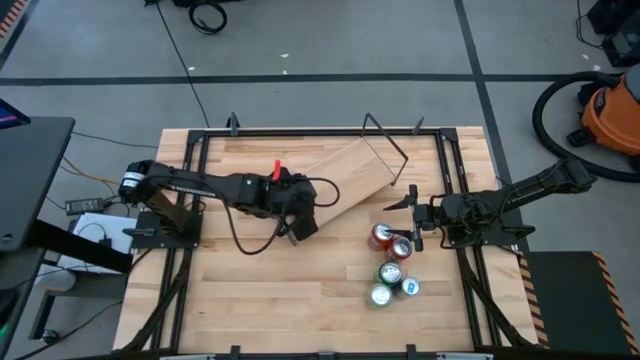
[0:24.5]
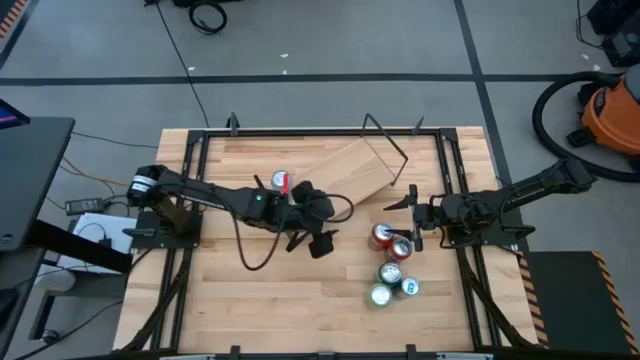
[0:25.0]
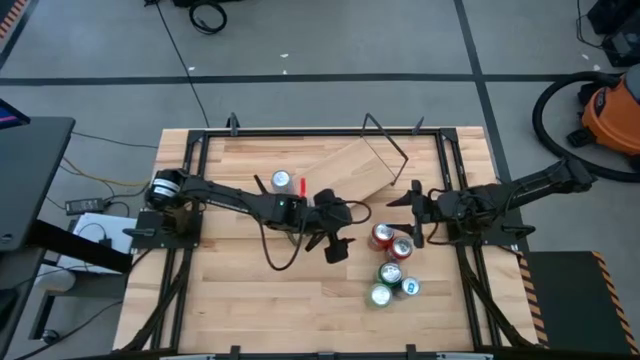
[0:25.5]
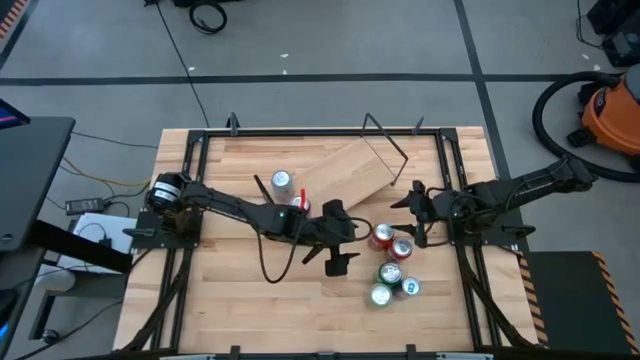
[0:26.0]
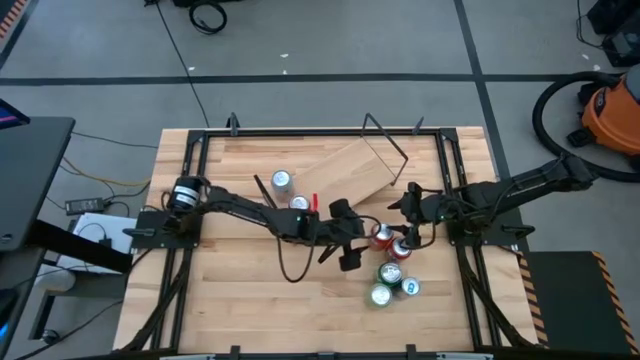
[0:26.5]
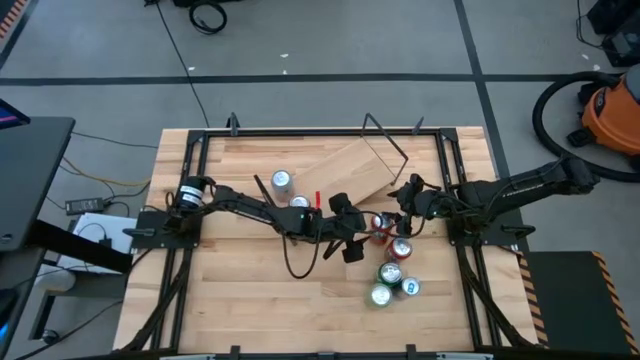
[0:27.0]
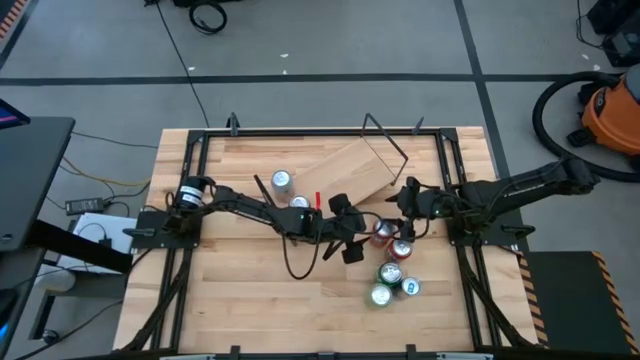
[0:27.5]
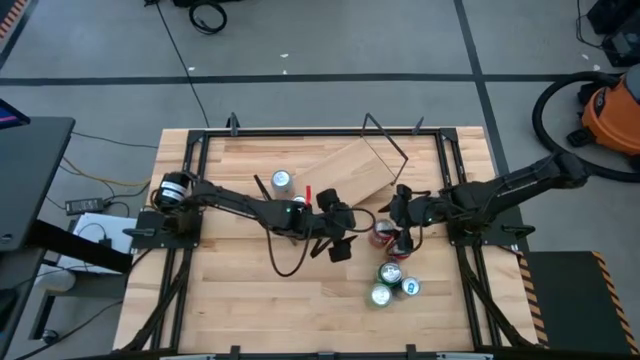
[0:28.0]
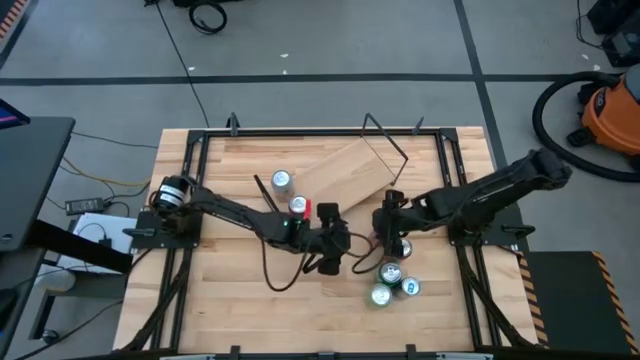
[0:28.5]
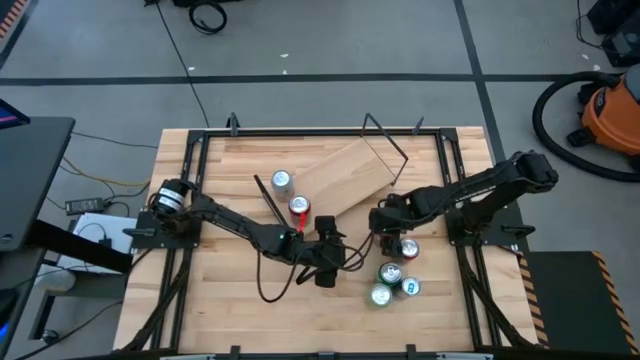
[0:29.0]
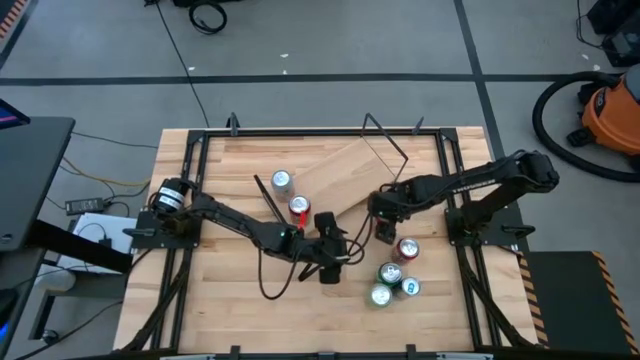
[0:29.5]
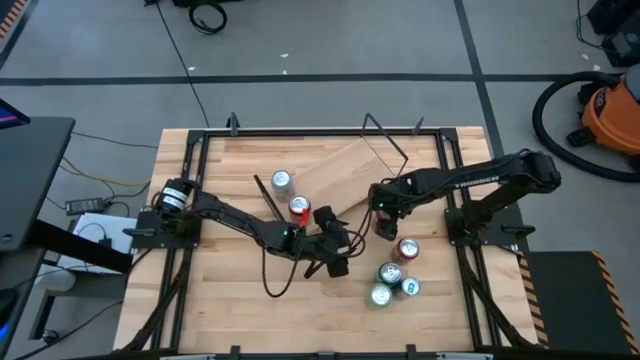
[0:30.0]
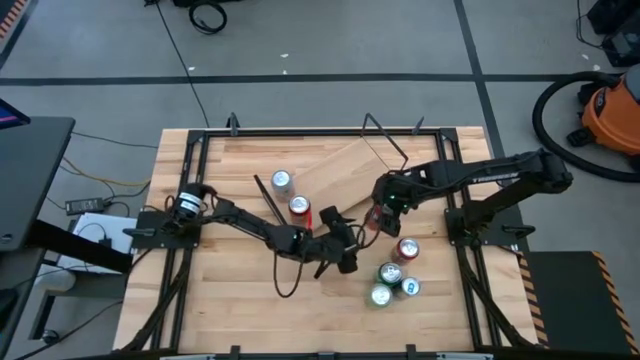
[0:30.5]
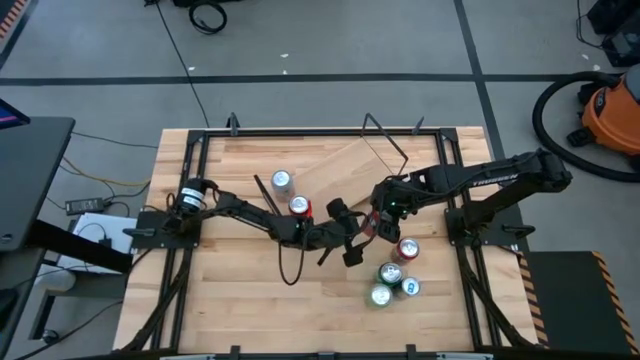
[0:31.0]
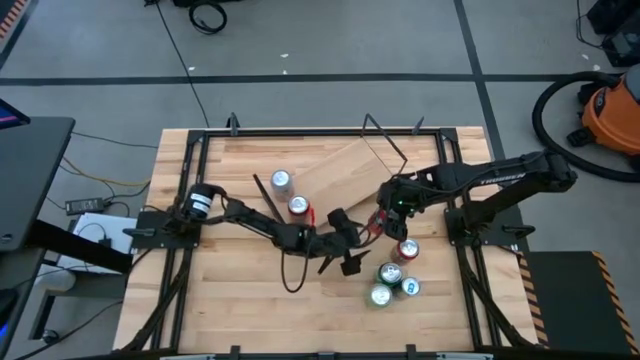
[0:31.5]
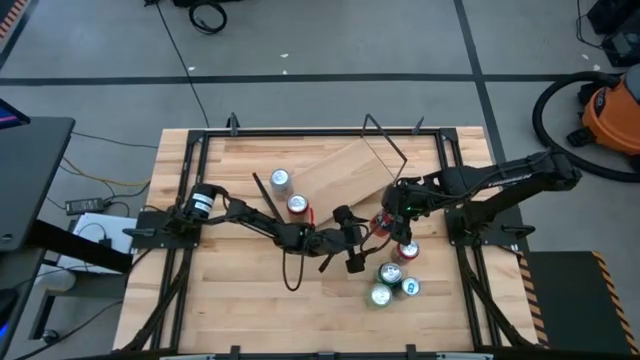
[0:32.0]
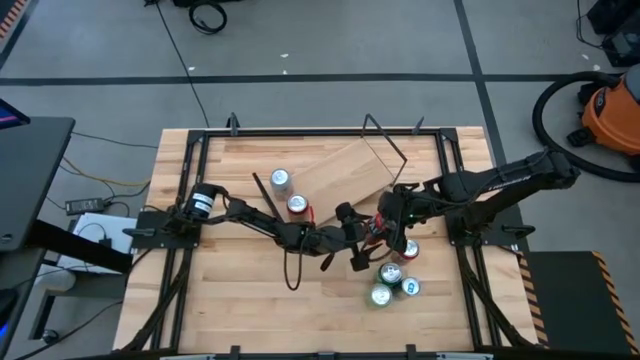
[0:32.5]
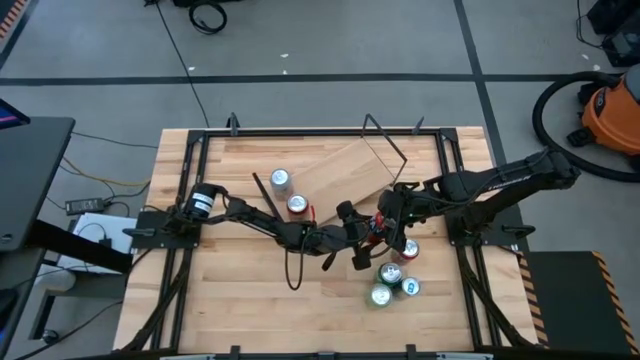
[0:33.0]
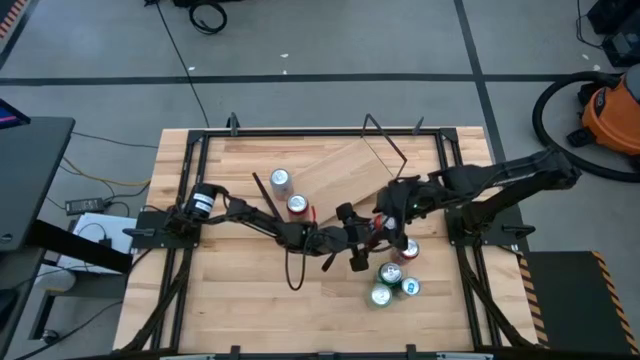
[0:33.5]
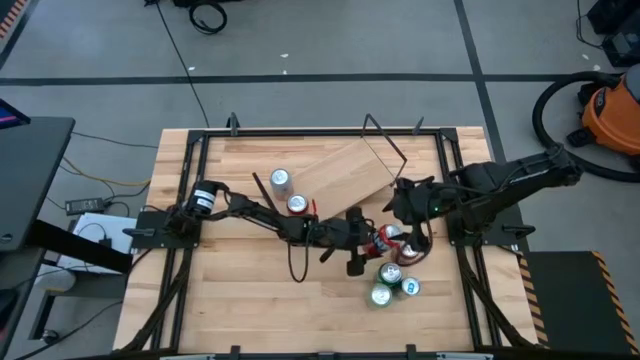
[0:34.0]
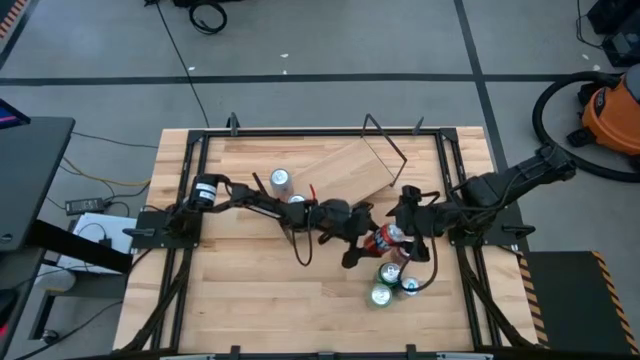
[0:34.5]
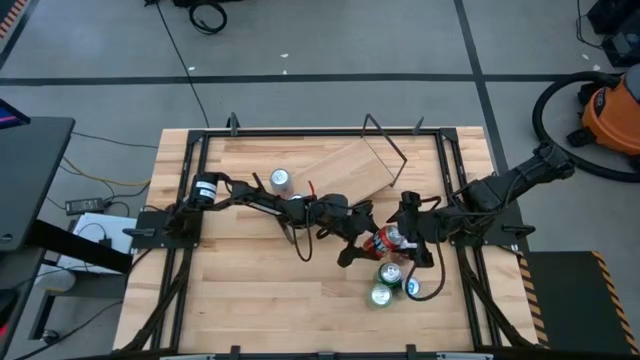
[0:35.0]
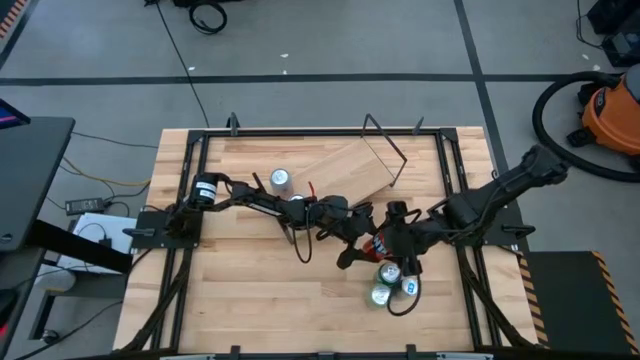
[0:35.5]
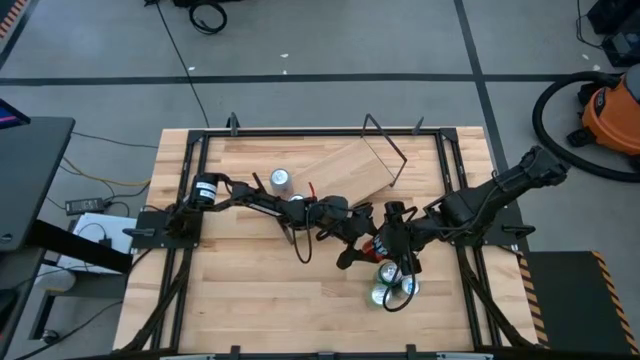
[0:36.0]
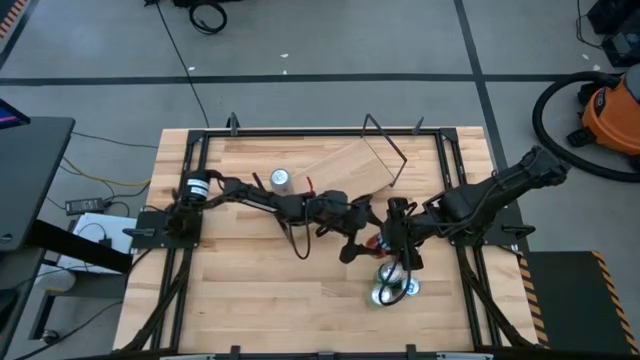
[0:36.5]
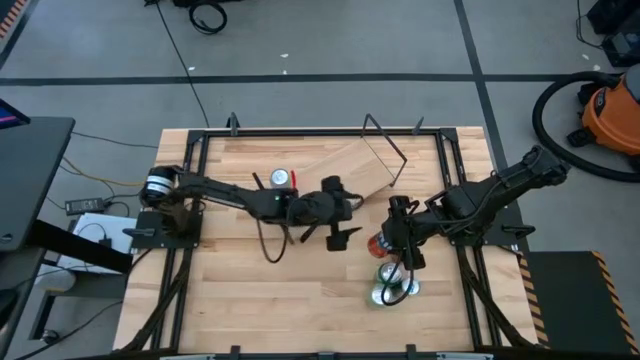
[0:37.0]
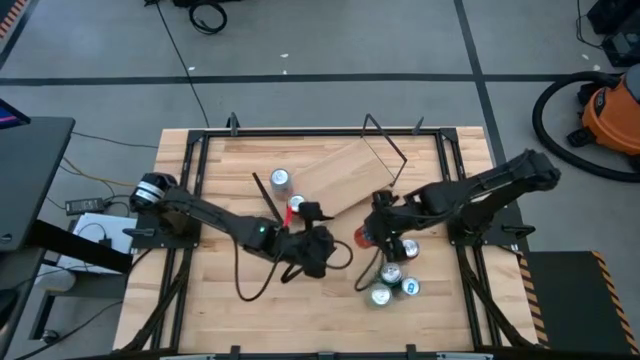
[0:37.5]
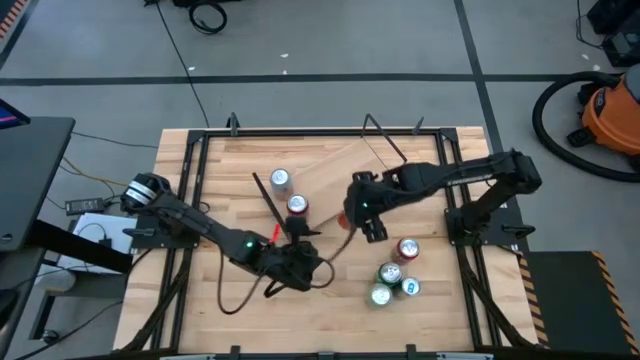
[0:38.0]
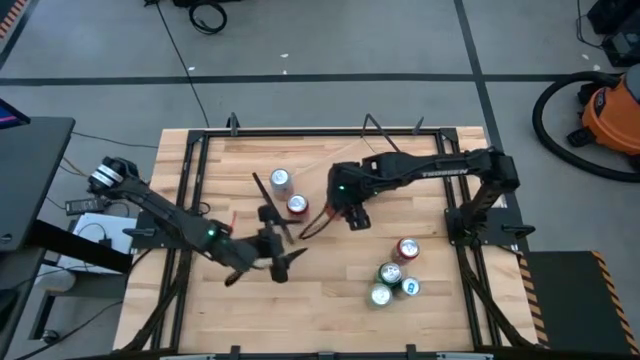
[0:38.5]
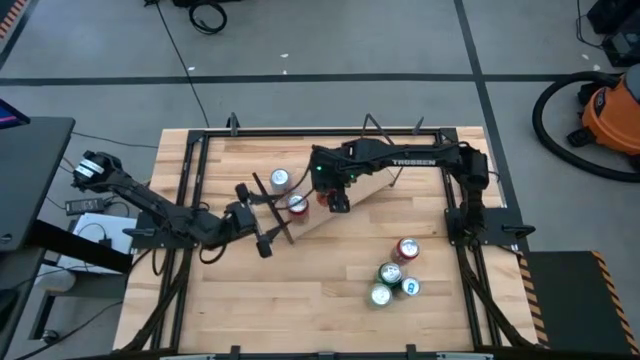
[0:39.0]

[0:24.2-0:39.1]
Task: Place canned beverage on shelf
Put the top red soda can on the shelf

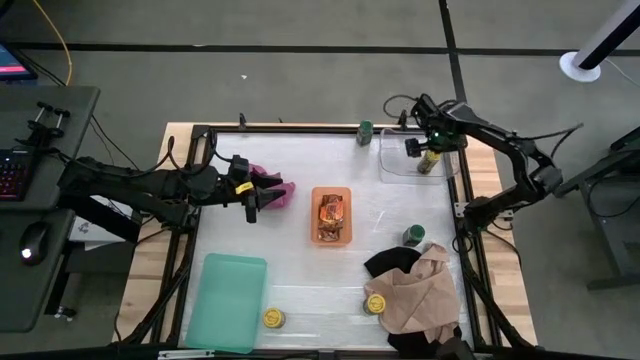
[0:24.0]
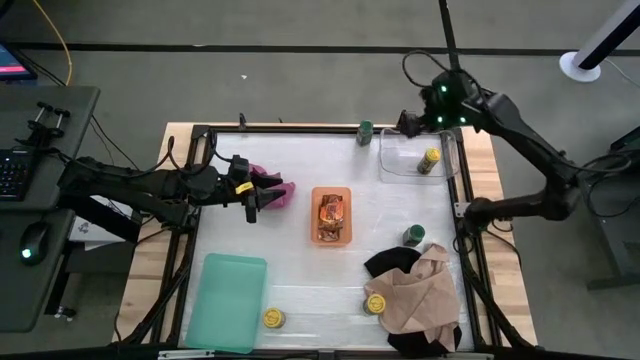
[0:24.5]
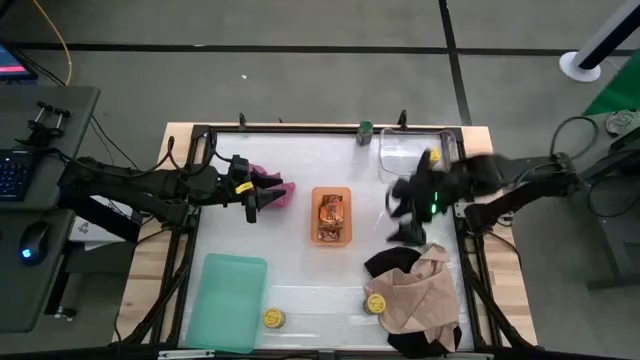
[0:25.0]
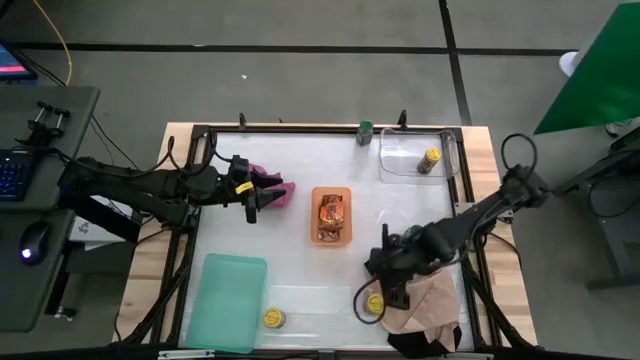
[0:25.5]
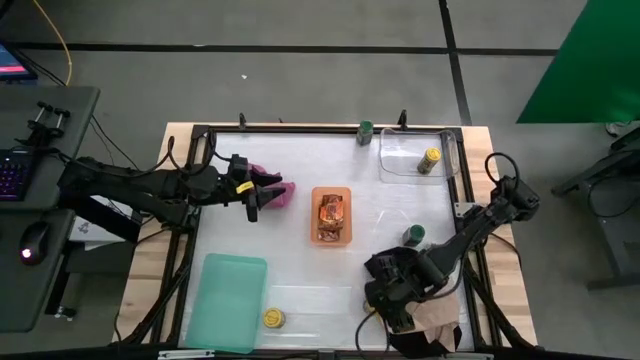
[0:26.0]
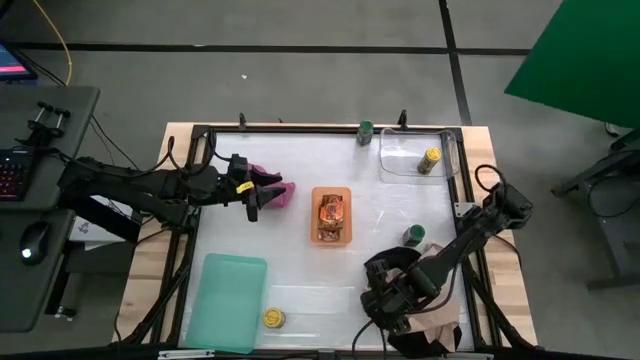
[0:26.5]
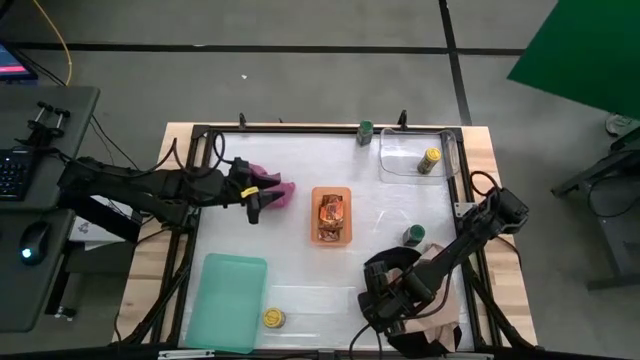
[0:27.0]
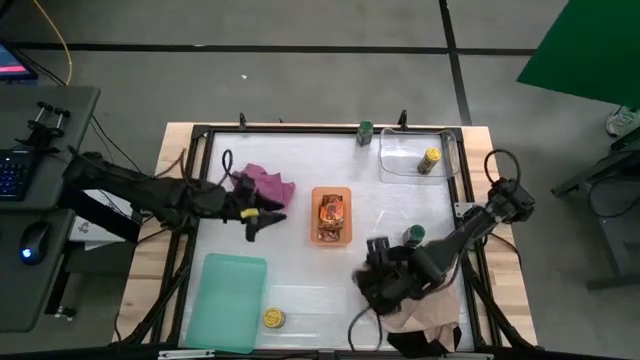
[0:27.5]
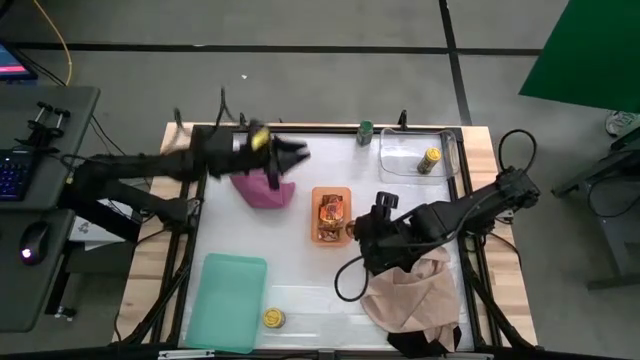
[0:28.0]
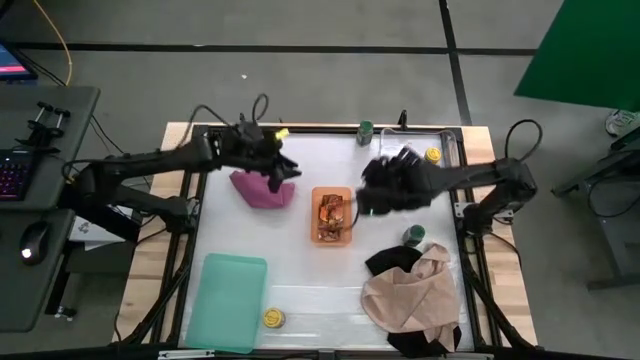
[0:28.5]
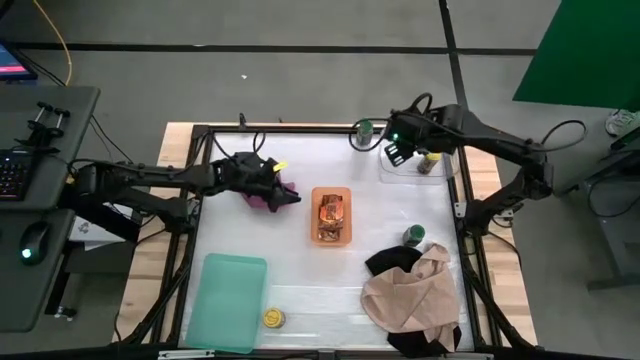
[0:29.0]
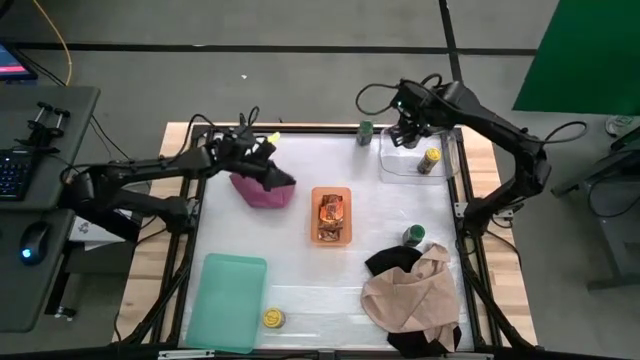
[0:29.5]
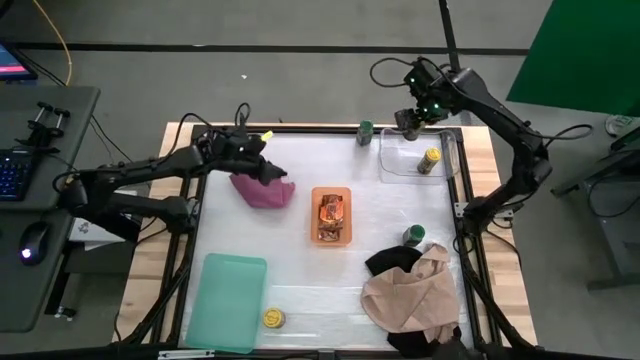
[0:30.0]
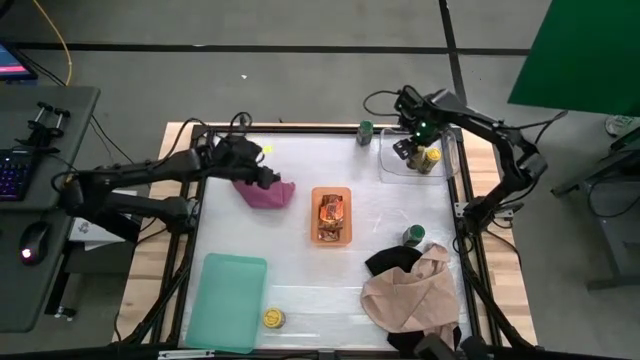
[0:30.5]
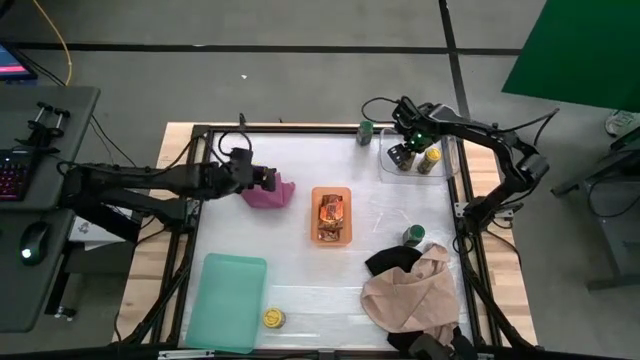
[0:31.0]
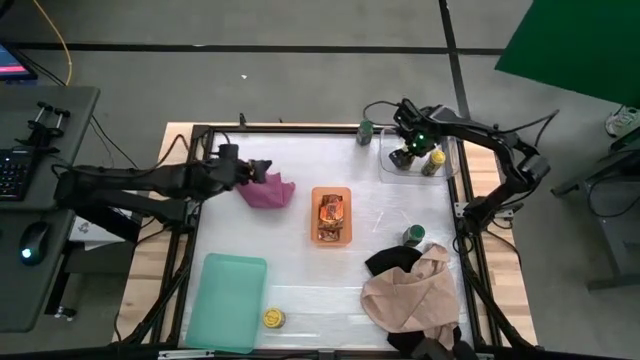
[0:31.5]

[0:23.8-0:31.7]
Task: Sort spices by type
Put the right yellow seasoning bottle into the transparent bin
